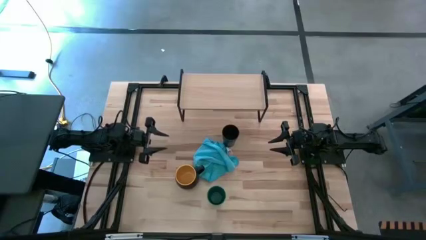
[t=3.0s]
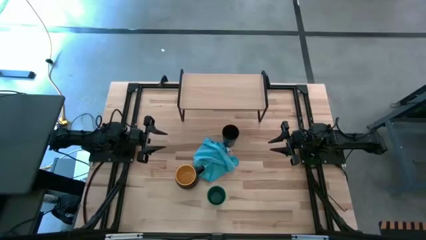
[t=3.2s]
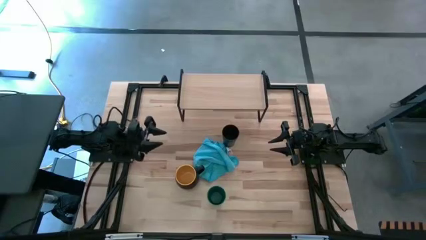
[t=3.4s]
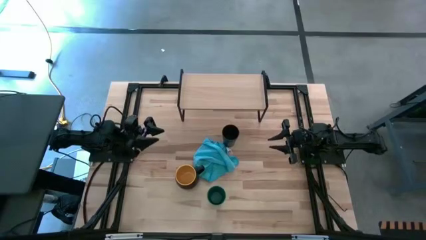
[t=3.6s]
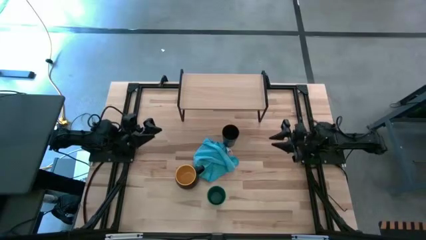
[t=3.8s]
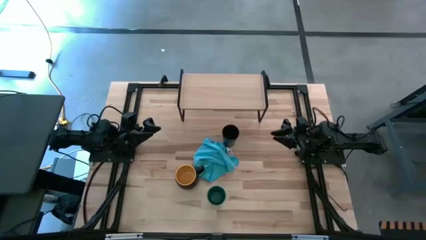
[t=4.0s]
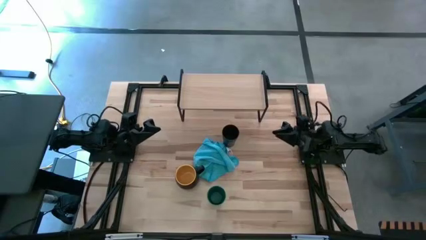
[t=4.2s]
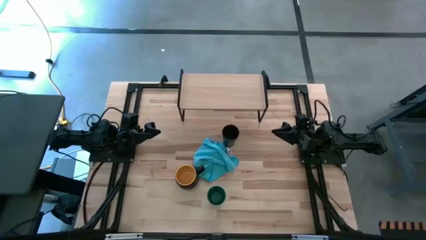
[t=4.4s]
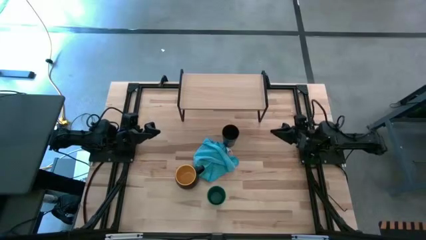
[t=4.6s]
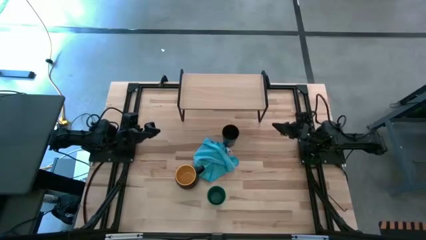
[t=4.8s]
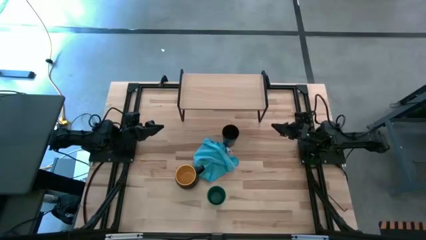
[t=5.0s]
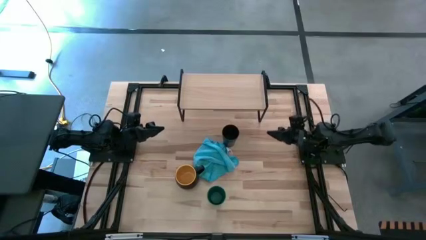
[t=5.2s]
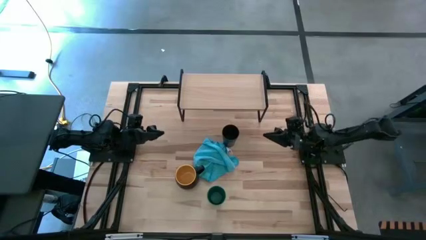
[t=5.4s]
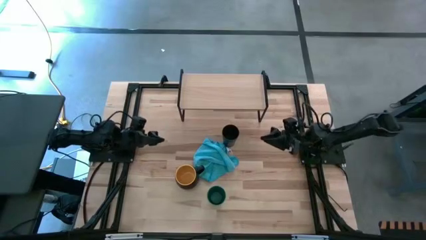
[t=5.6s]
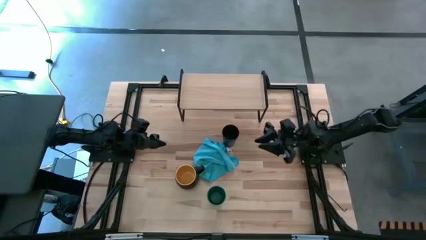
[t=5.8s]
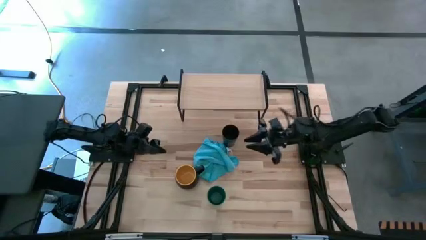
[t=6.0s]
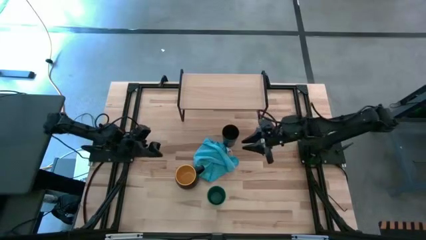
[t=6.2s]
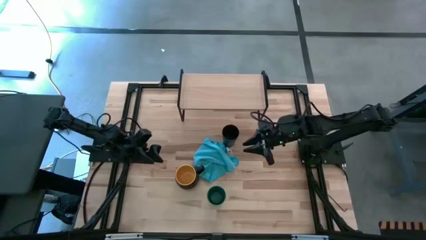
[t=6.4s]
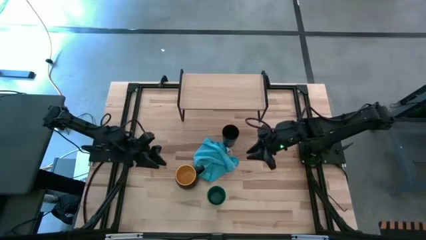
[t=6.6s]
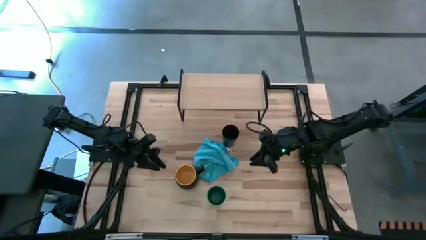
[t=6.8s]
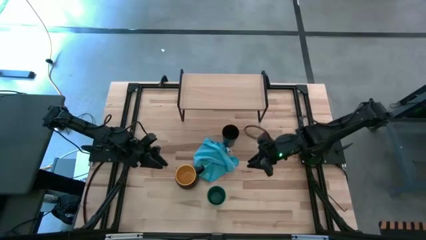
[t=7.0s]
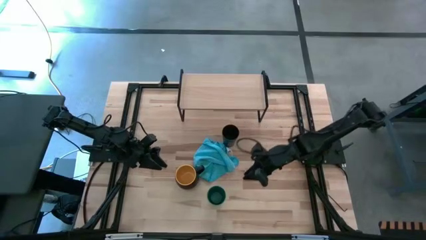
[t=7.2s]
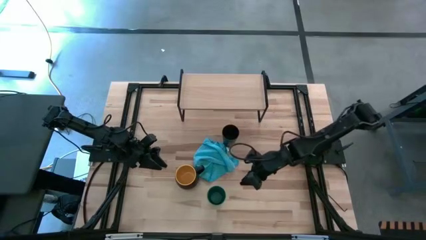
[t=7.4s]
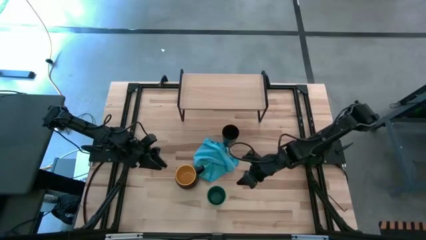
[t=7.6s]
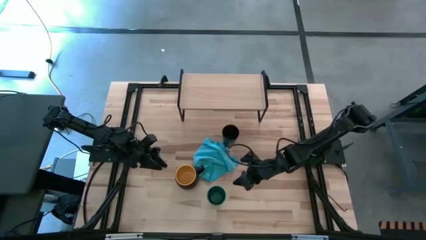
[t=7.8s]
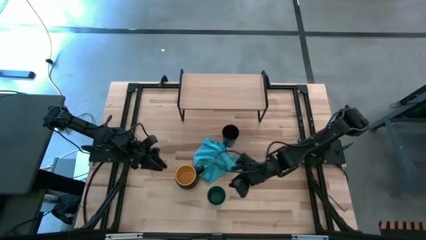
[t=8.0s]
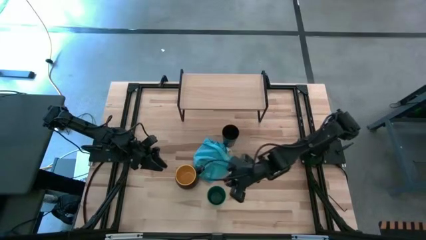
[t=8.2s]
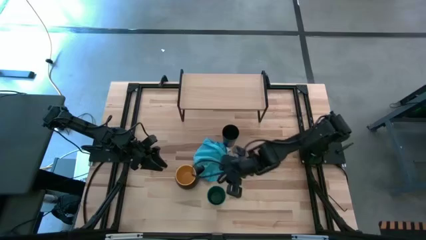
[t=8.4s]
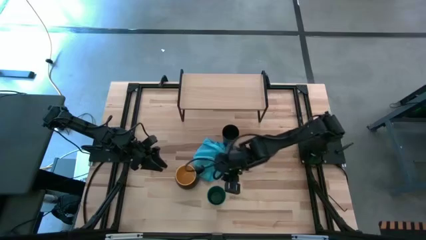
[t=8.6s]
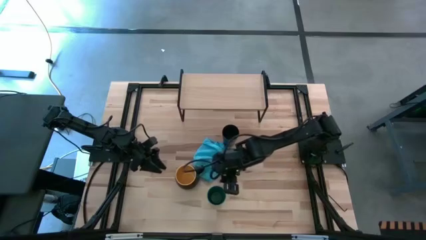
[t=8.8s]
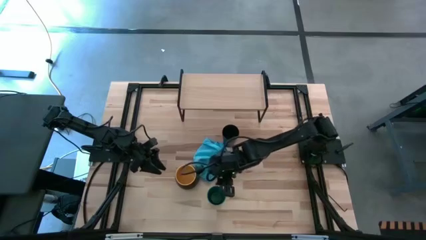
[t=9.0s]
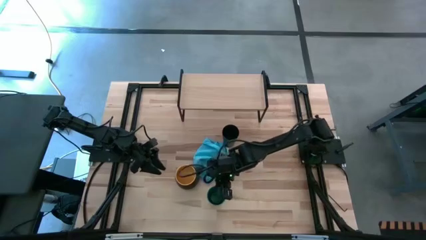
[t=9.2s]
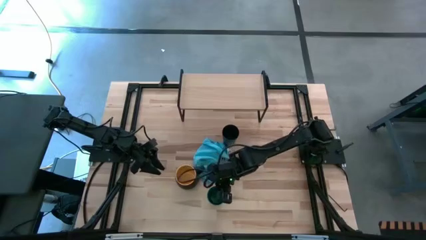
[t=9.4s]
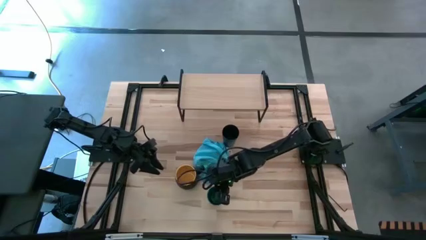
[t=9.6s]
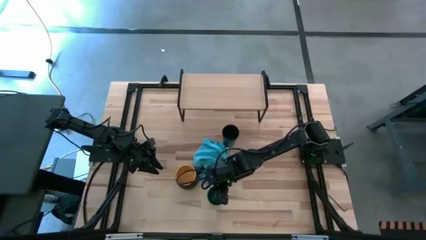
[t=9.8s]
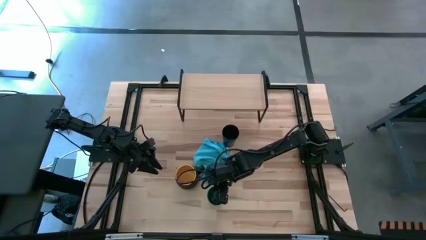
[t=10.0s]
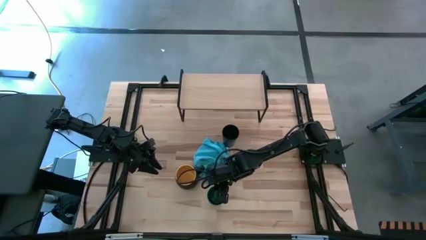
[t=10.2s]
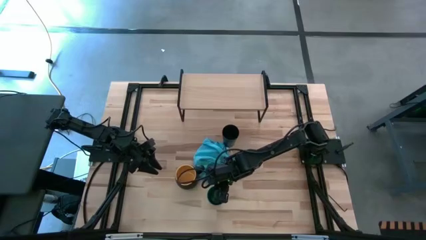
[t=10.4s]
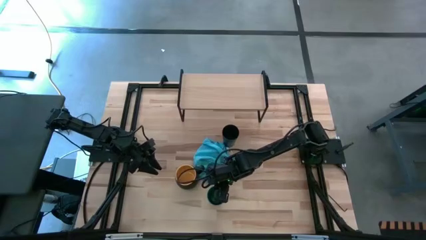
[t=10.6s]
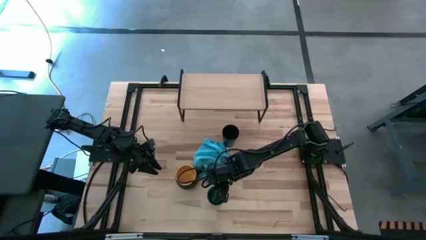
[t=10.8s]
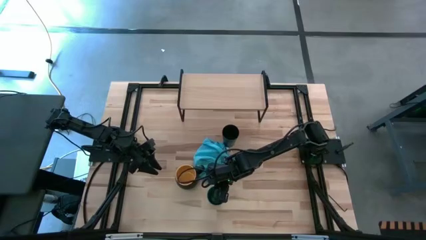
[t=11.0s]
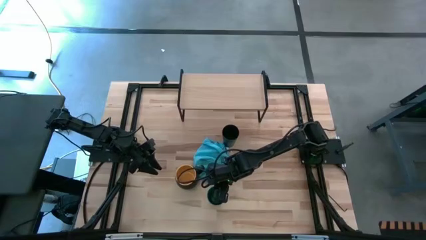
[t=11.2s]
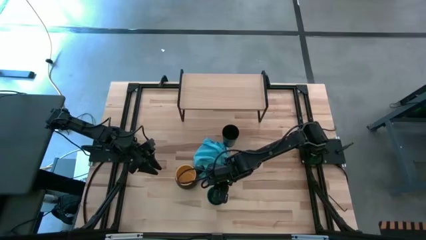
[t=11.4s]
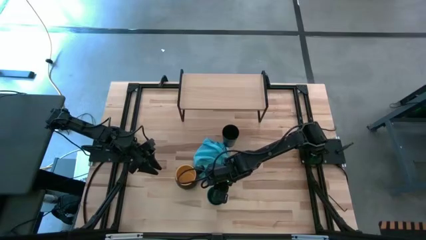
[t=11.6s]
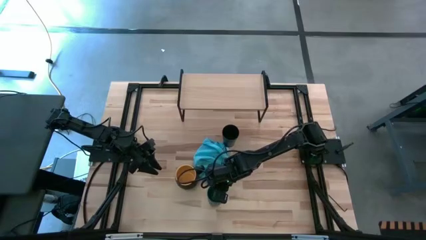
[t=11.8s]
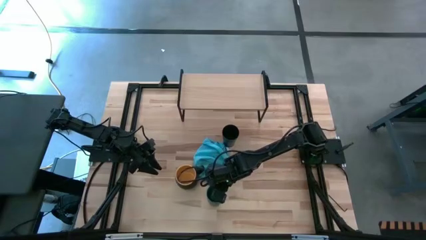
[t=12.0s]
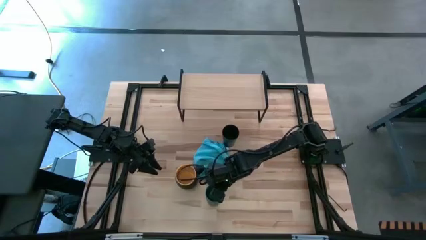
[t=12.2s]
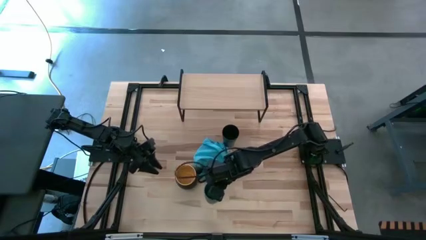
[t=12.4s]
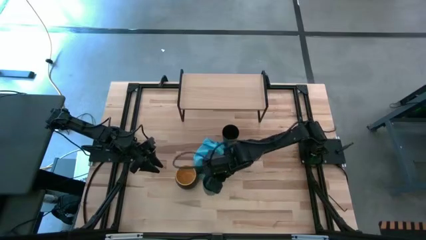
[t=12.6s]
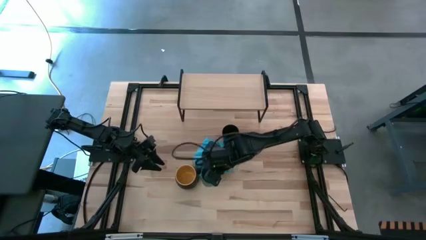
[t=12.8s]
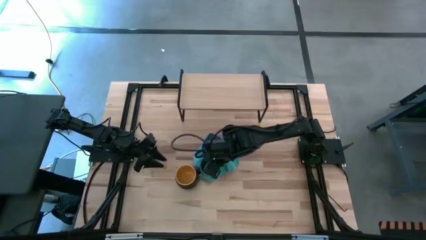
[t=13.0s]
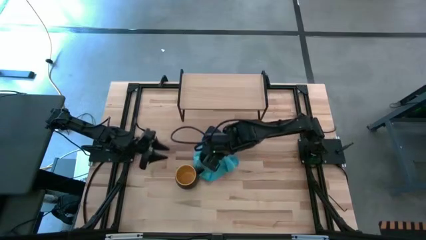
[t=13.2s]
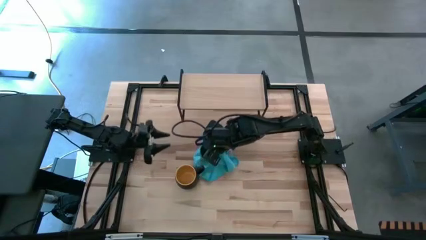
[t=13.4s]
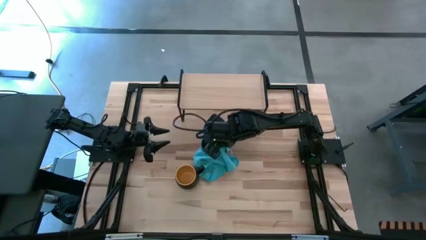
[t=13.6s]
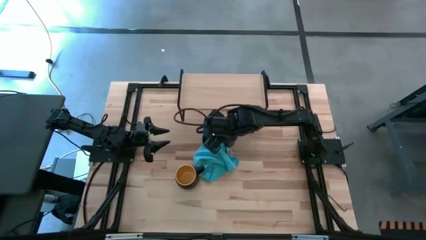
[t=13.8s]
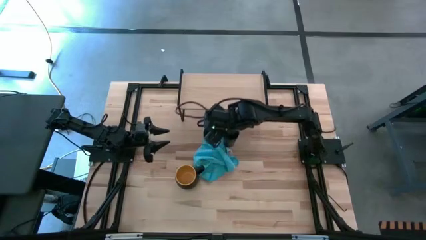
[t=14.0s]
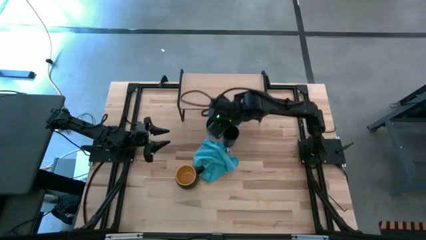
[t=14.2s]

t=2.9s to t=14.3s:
Task: Stack small to large cups/mugs on shelf
Put the green cup on the shelf
